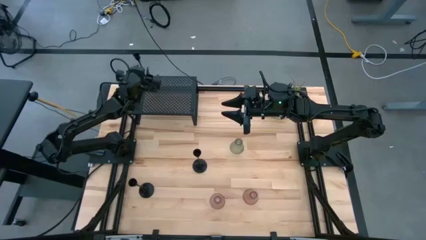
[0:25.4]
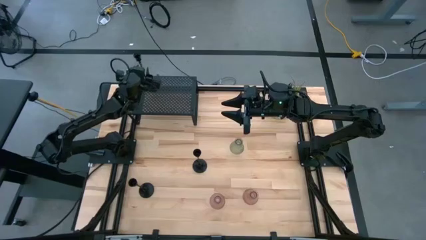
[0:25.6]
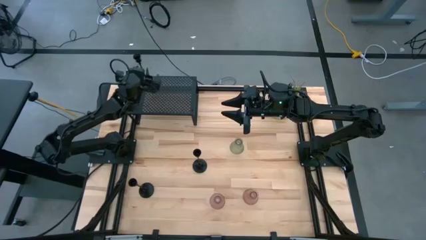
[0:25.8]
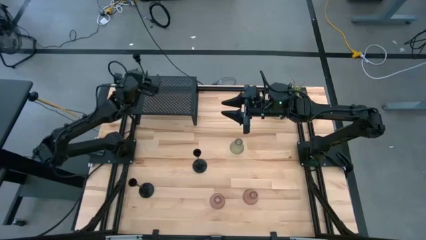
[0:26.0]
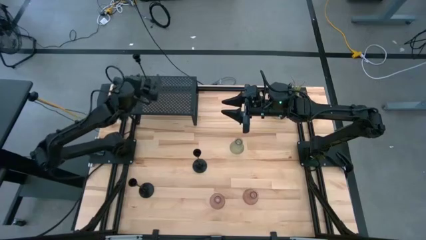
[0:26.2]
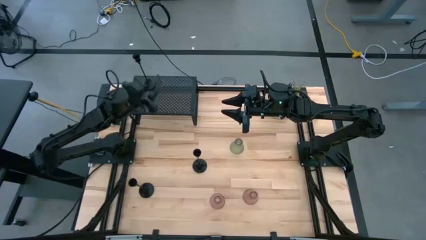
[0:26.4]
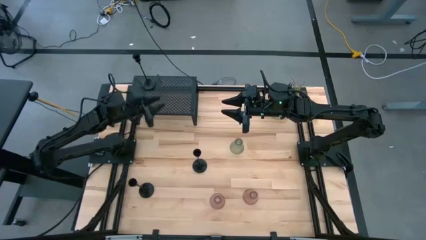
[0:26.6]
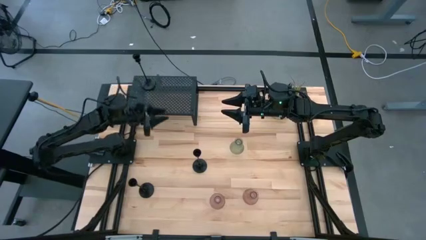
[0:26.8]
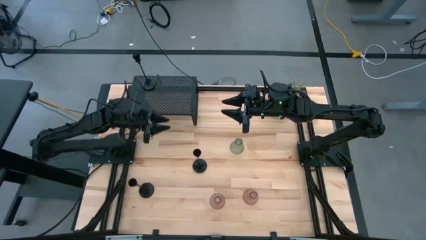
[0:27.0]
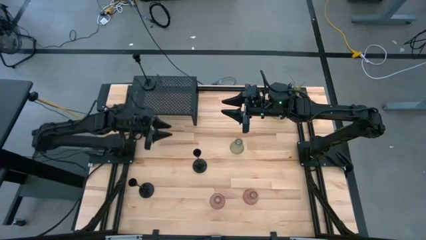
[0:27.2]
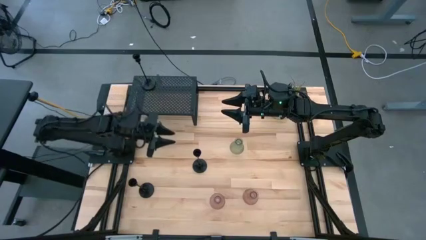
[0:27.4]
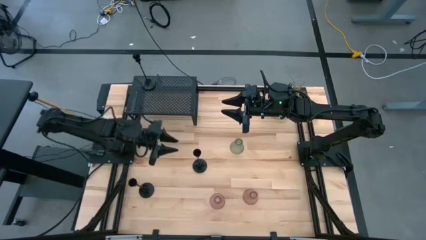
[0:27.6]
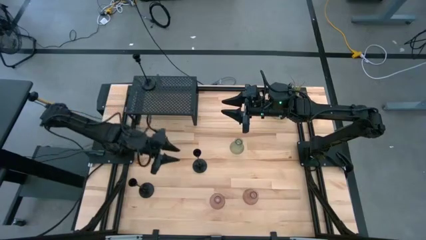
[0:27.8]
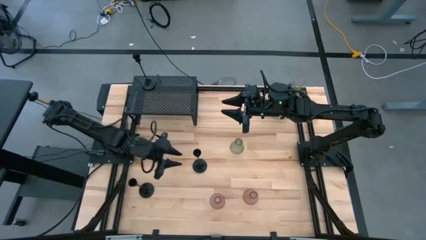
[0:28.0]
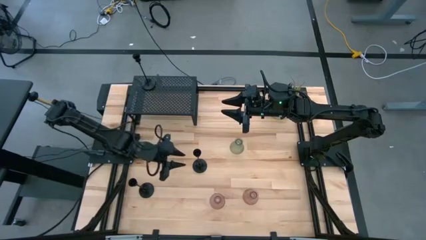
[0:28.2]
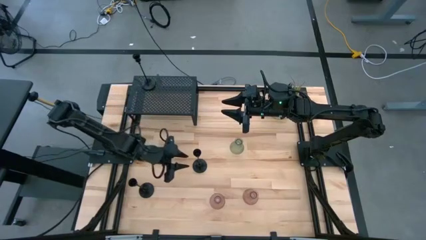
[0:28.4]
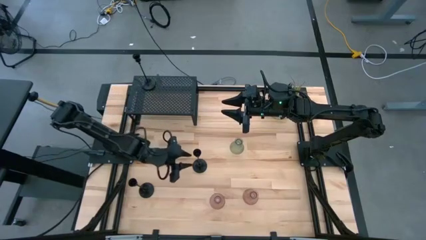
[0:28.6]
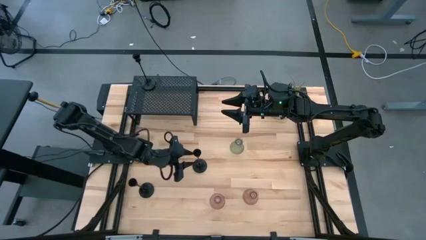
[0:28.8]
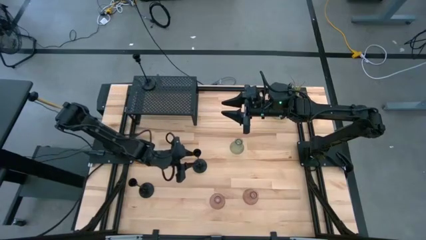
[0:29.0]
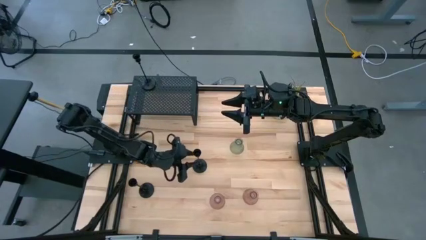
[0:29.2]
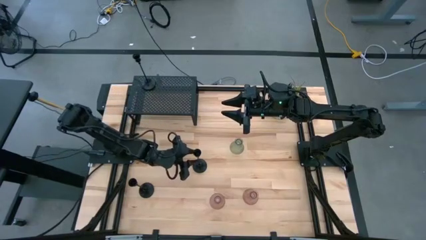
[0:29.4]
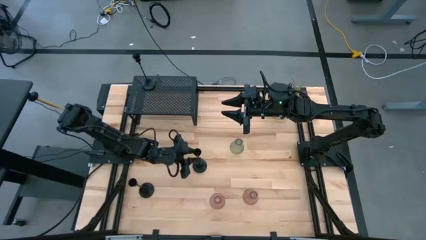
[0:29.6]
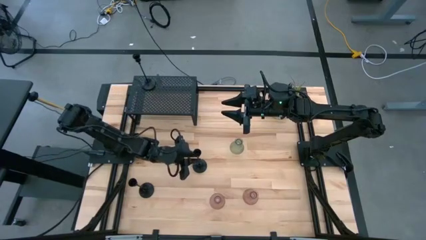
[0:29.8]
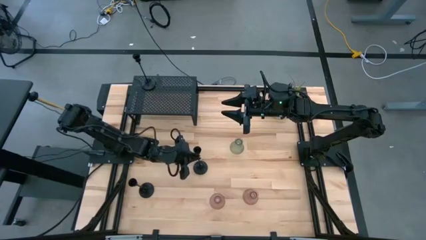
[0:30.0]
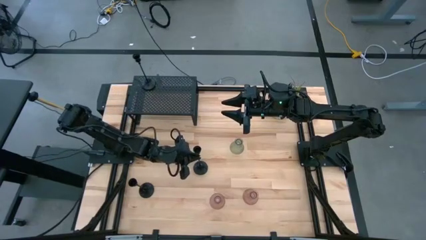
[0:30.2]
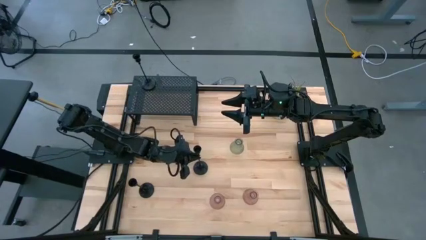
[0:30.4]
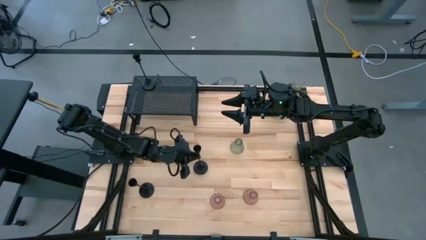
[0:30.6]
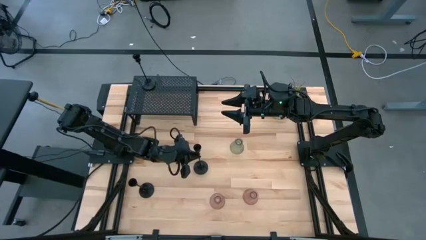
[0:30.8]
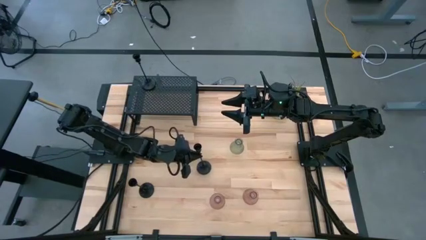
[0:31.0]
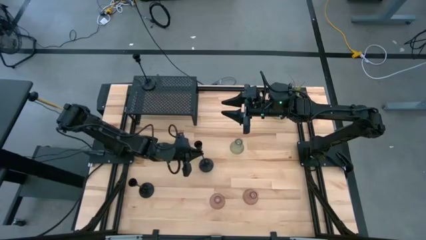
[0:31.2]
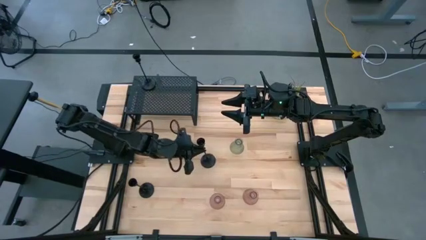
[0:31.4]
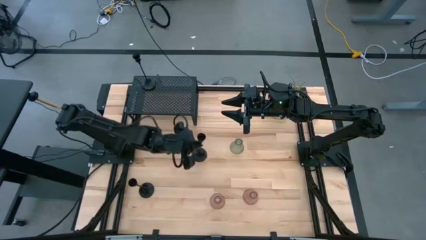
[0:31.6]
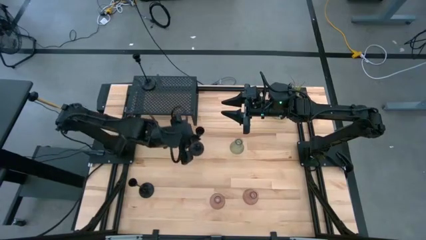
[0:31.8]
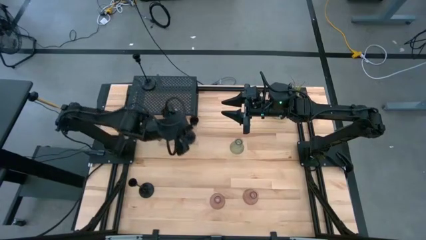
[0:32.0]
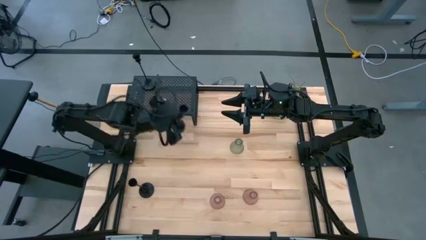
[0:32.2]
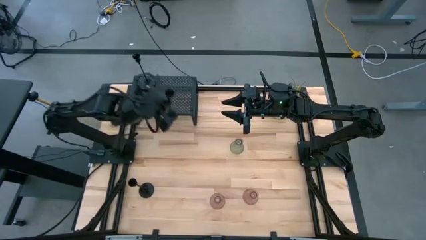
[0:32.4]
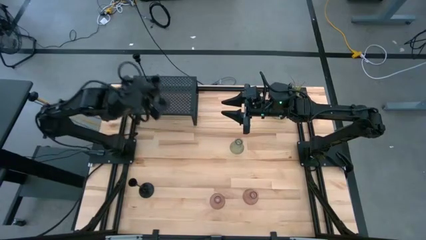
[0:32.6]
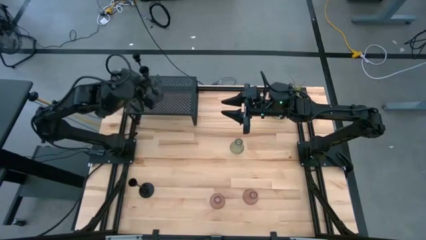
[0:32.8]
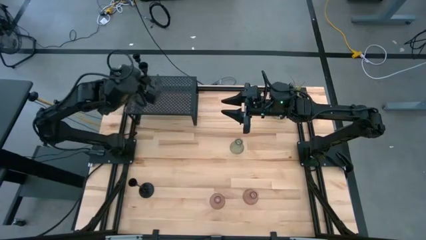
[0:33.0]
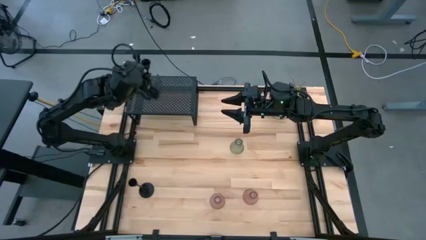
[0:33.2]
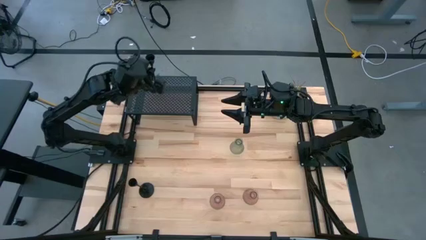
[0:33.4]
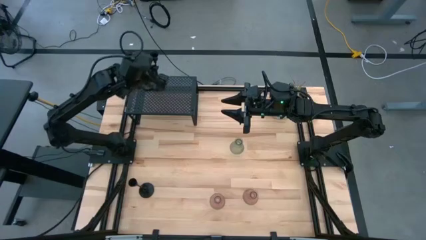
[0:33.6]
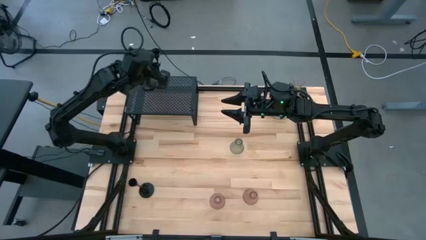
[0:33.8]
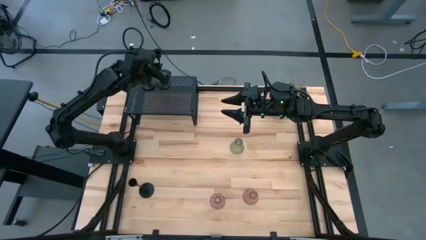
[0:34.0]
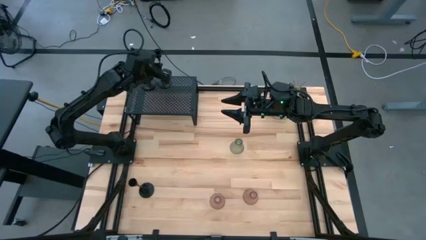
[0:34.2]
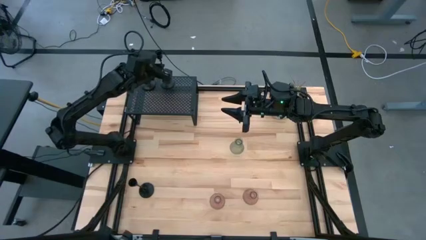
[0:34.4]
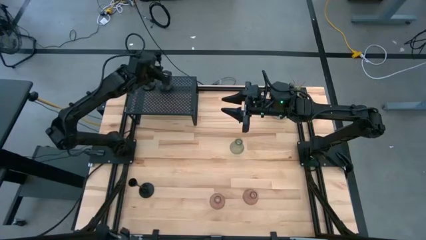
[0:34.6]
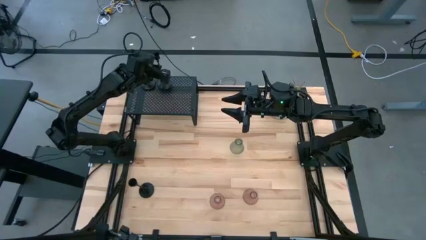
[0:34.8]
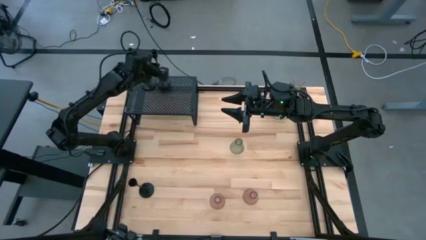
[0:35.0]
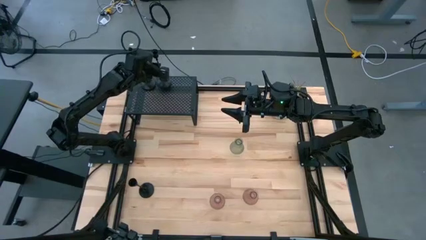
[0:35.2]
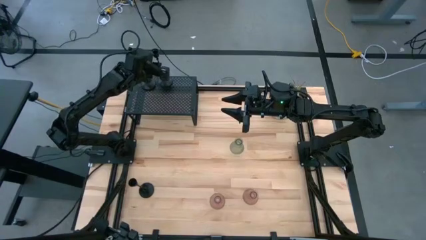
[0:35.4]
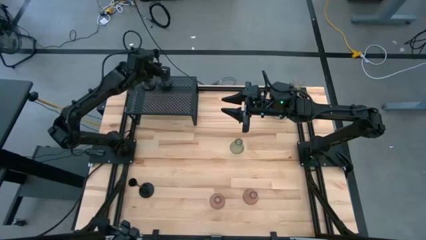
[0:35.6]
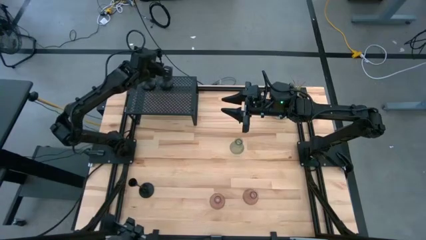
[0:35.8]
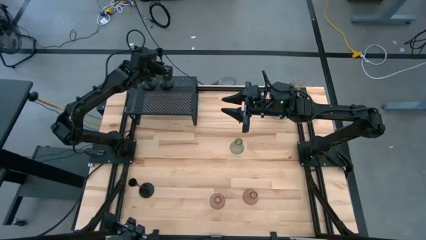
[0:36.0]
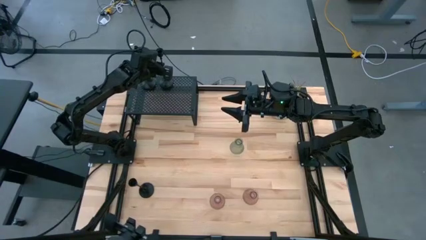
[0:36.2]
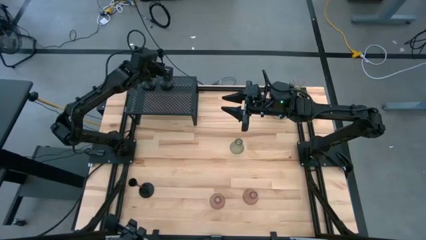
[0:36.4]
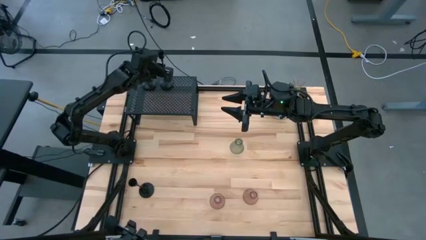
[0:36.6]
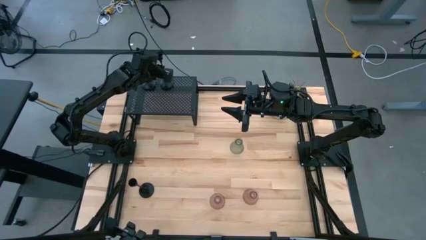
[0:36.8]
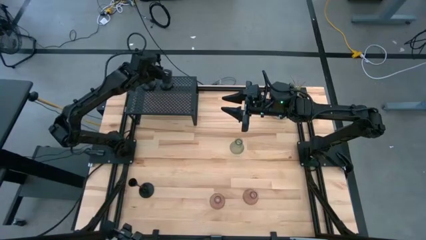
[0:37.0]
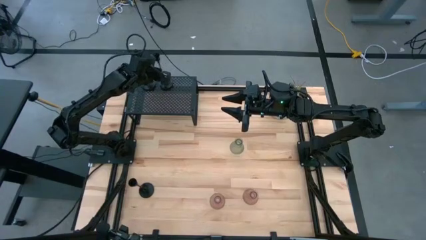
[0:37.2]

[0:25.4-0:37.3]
Task: Pick & Place candle stick holders
Put the right black candle holder on the shelf aligned with the other black candle holder

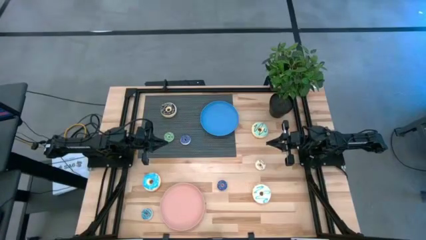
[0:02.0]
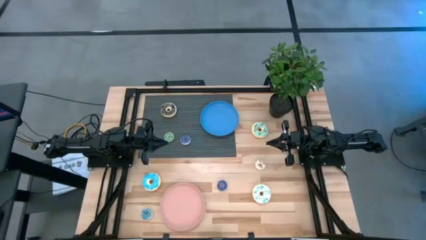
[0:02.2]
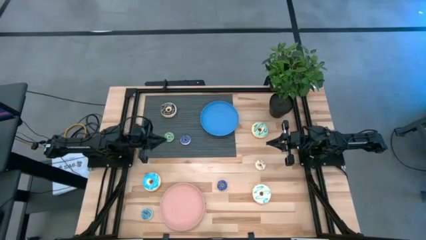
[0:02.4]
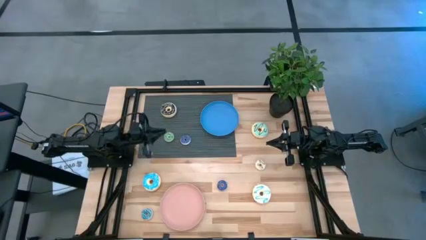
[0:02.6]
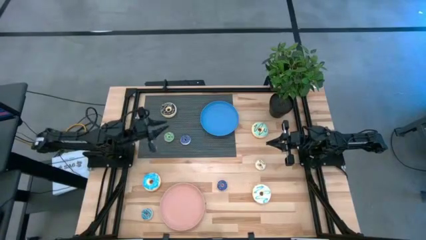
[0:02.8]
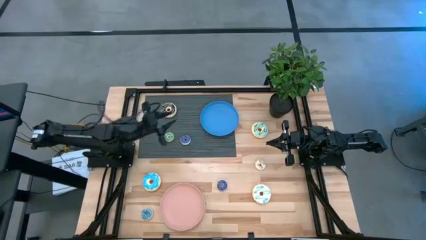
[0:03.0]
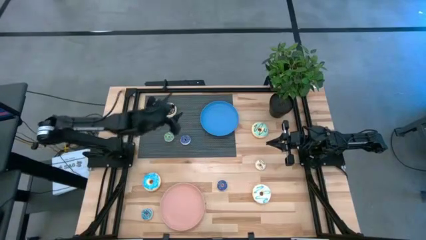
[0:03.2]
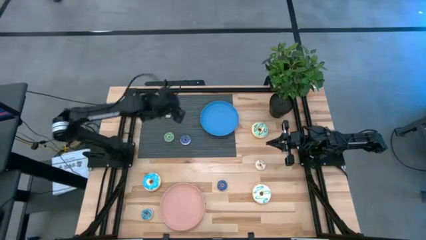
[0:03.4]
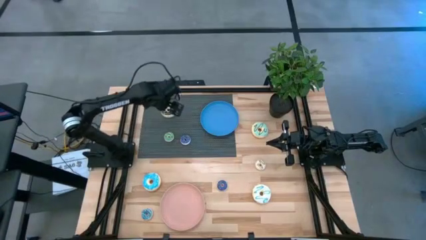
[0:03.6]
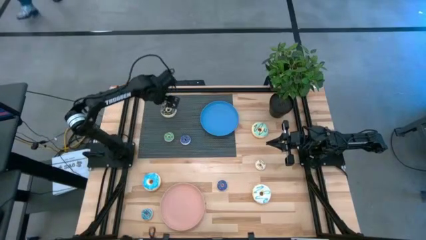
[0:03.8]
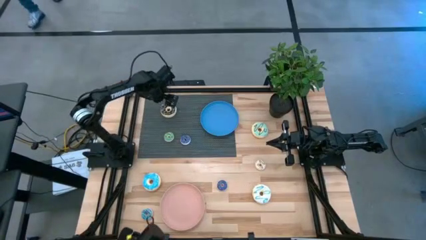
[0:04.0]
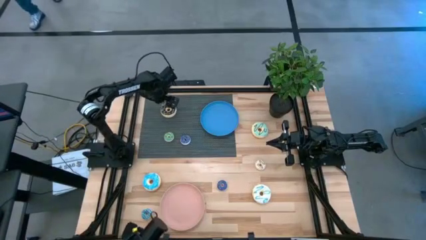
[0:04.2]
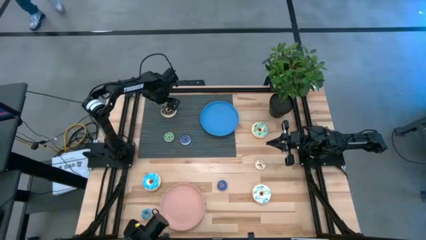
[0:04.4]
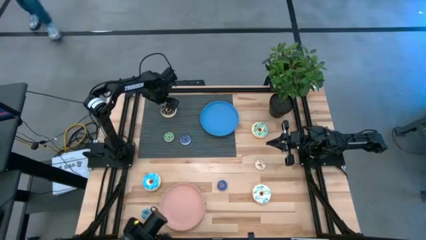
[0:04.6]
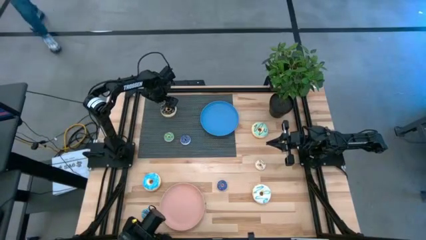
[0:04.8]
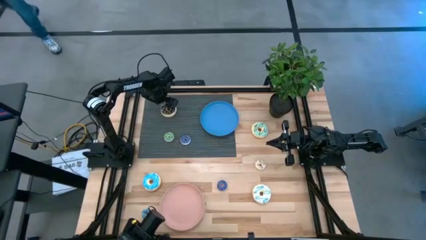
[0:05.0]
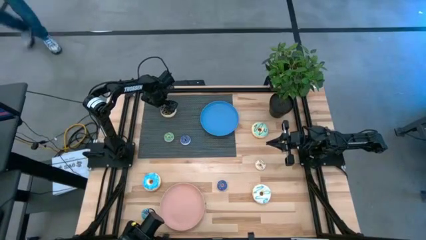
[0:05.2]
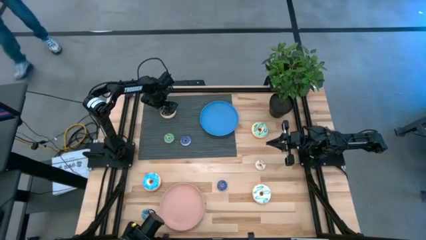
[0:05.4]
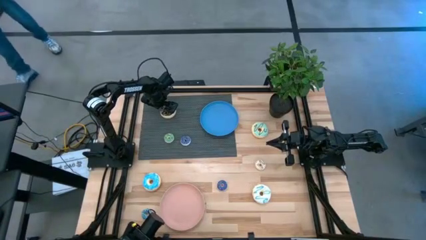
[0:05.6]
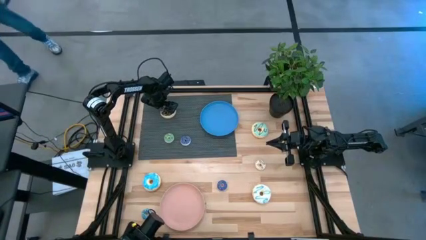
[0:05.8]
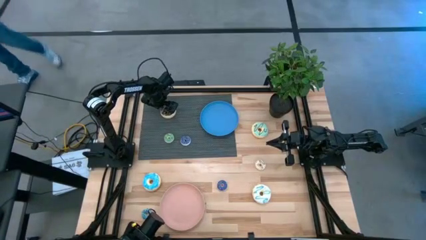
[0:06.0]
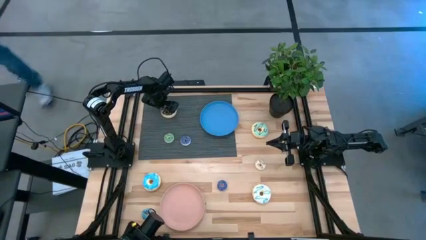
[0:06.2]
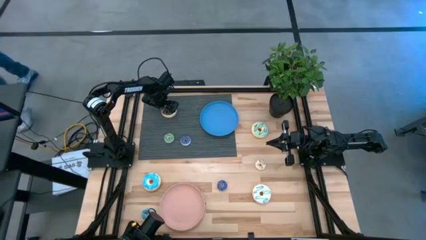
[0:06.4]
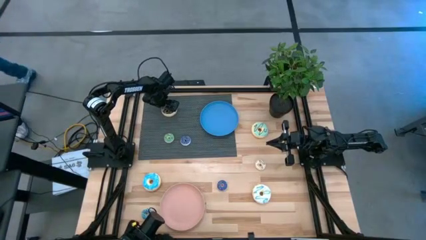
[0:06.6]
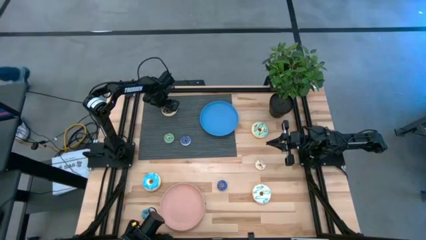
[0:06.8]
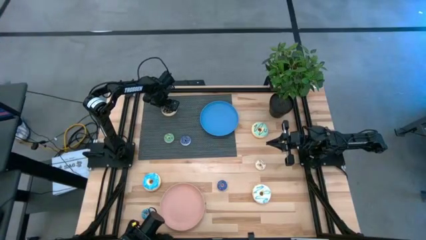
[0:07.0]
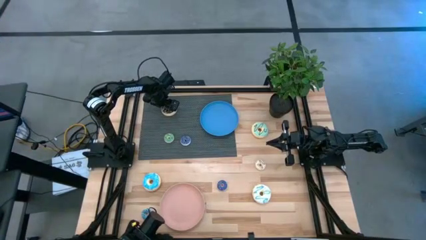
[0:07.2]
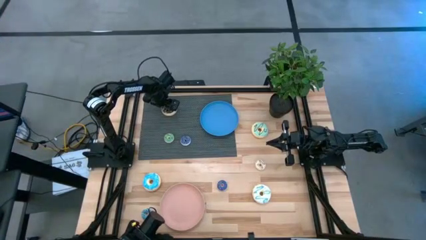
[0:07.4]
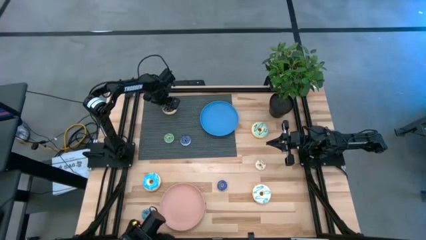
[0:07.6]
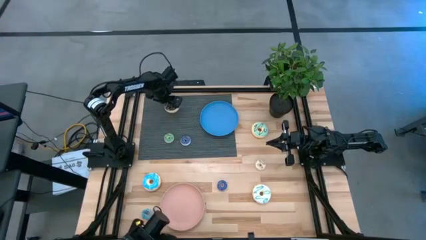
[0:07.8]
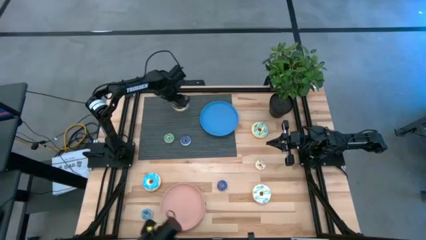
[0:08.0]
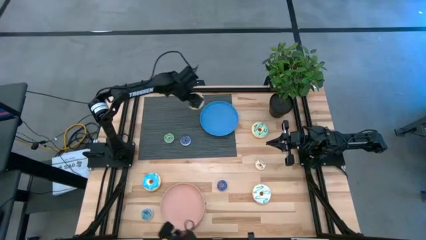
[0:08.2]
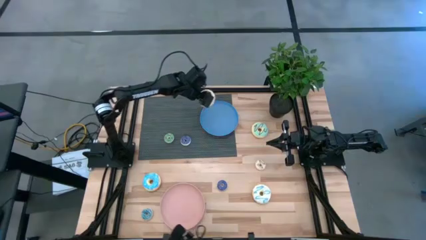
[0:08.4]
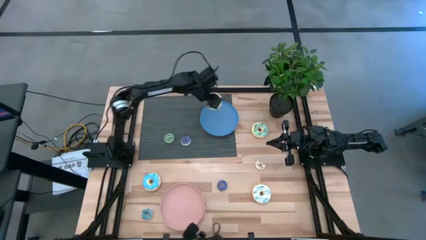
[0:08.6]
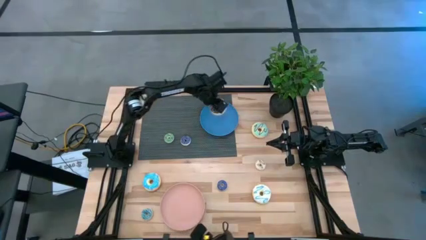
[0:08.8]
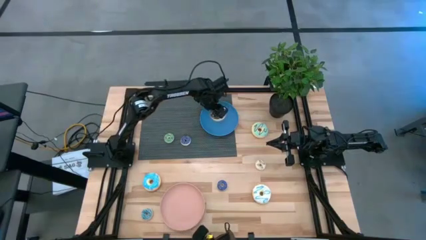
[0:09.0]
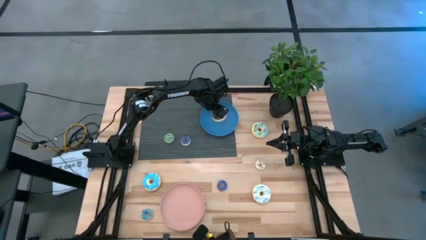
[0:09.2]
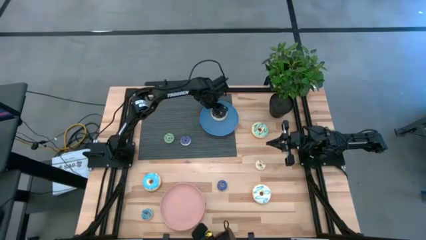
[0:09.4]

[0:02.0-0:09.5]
Task: Pick & Place donuts
Put the large black donut on the blue plate
